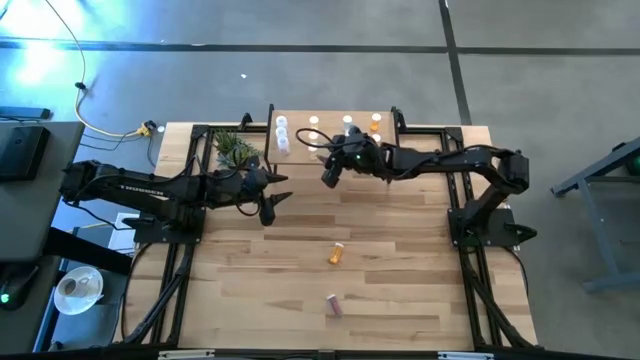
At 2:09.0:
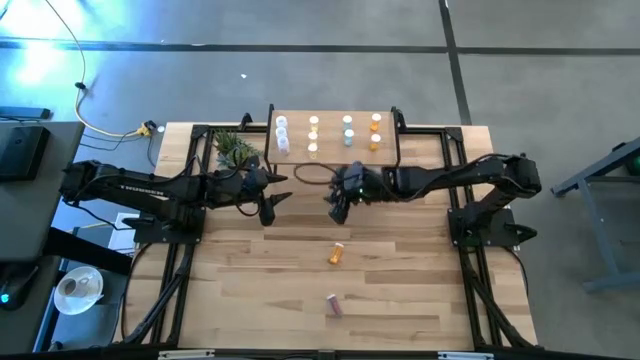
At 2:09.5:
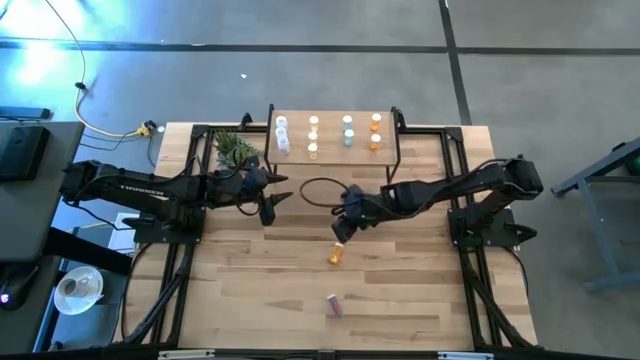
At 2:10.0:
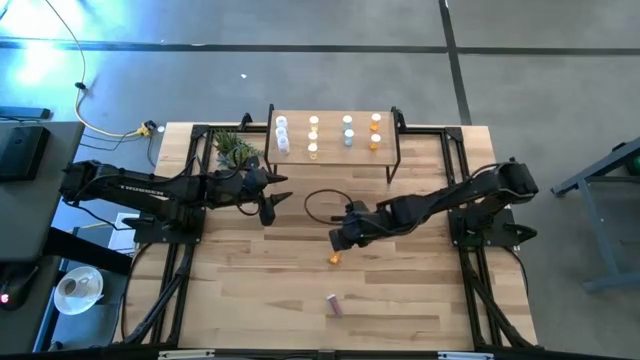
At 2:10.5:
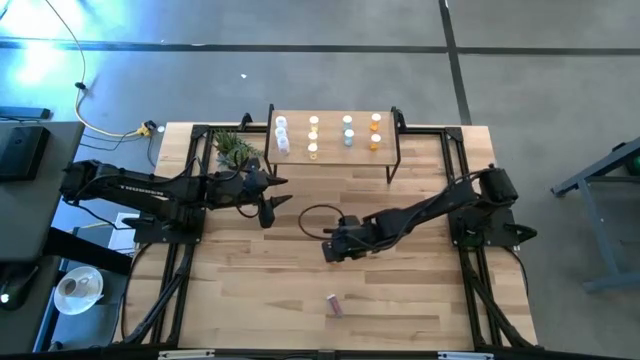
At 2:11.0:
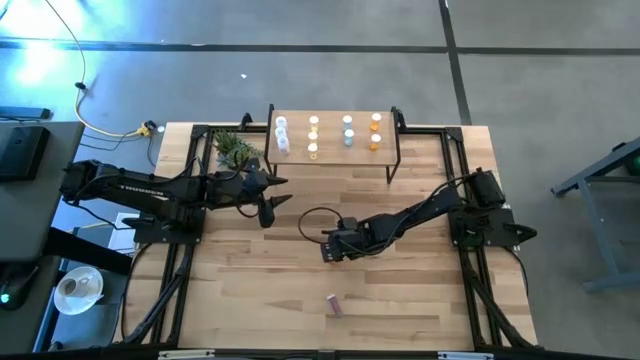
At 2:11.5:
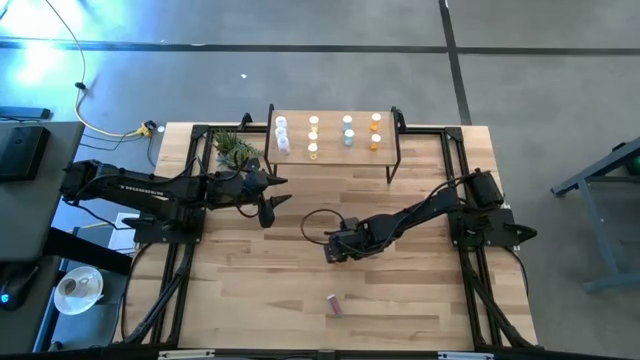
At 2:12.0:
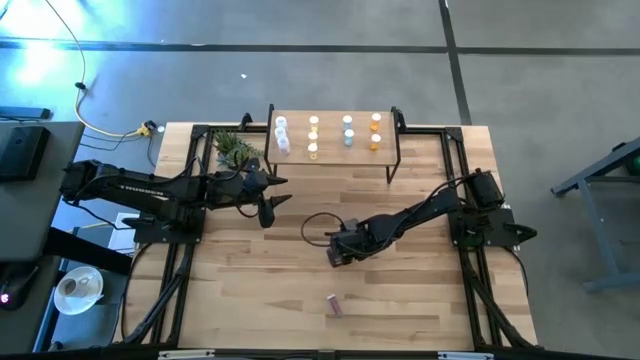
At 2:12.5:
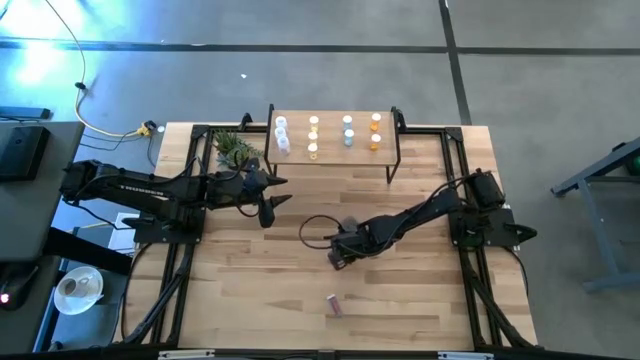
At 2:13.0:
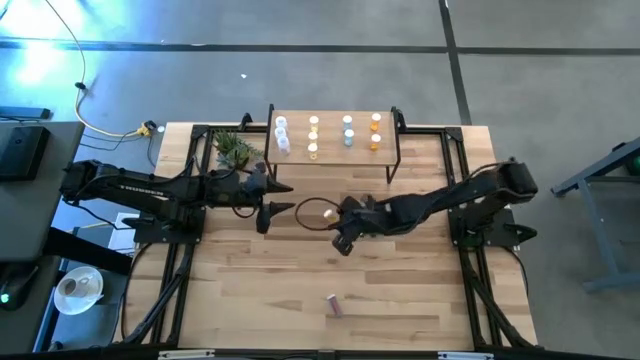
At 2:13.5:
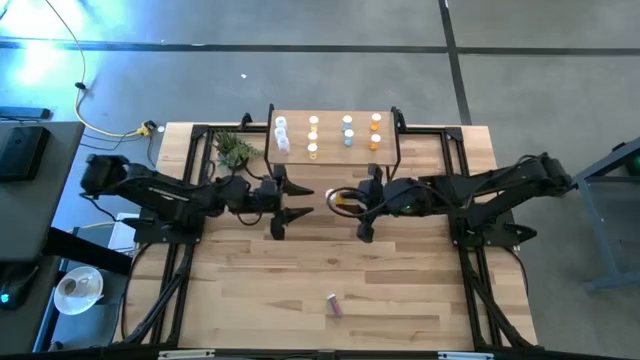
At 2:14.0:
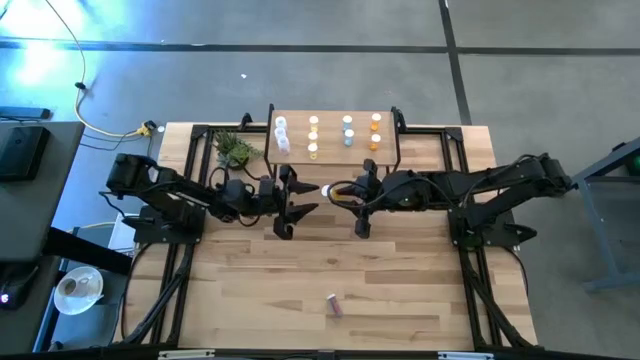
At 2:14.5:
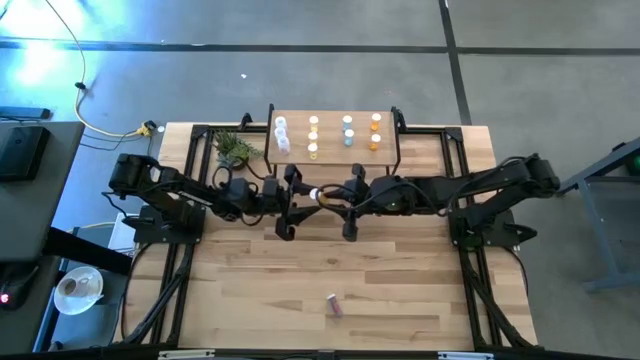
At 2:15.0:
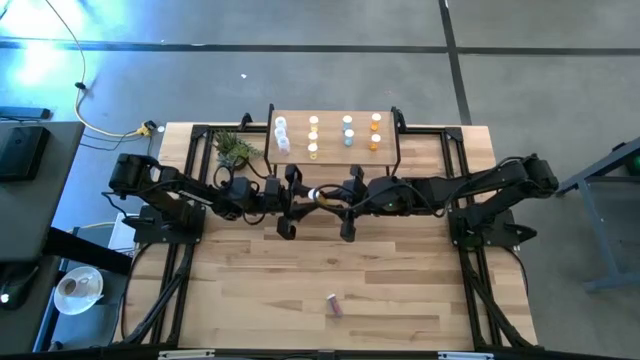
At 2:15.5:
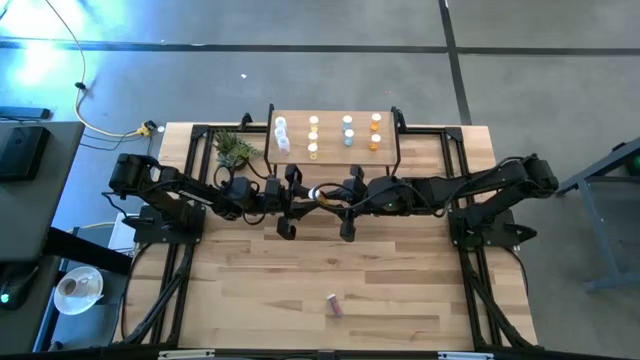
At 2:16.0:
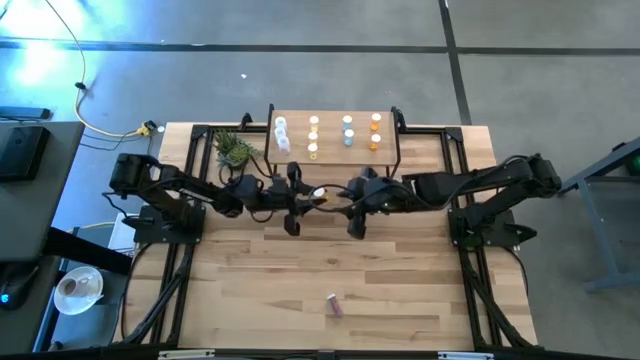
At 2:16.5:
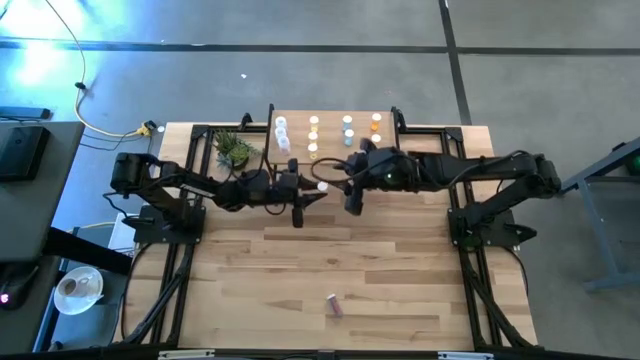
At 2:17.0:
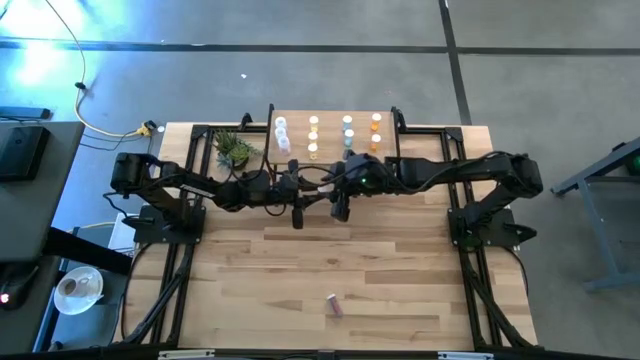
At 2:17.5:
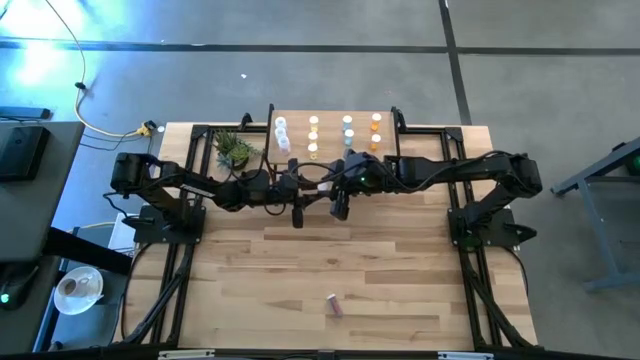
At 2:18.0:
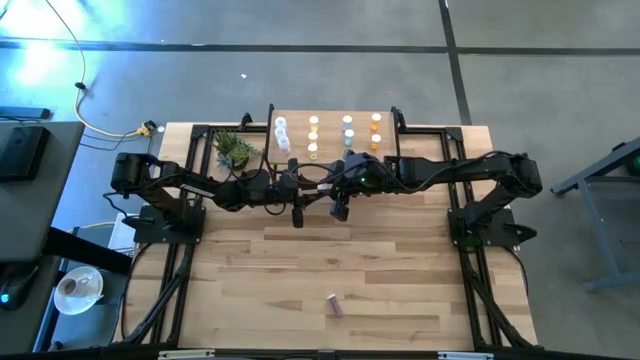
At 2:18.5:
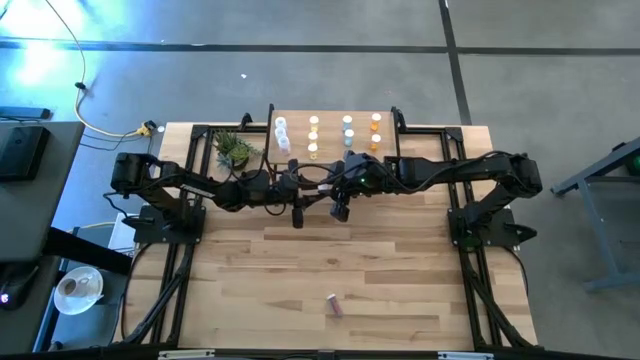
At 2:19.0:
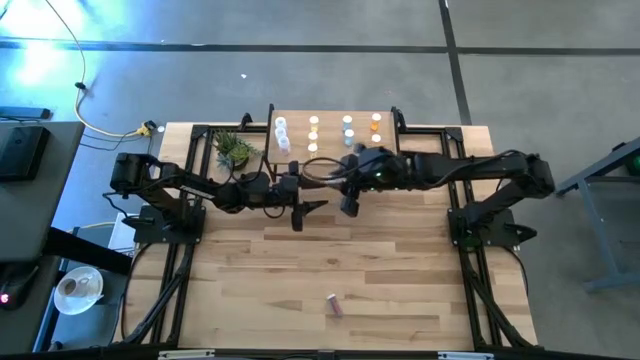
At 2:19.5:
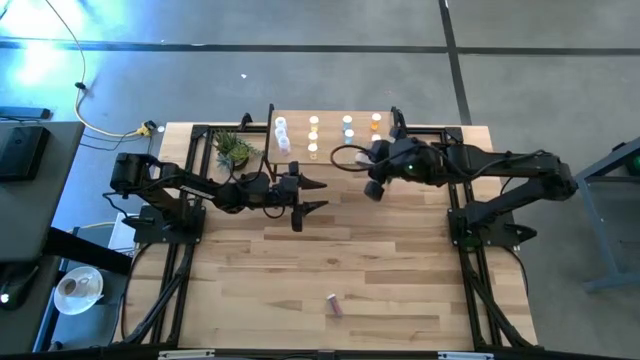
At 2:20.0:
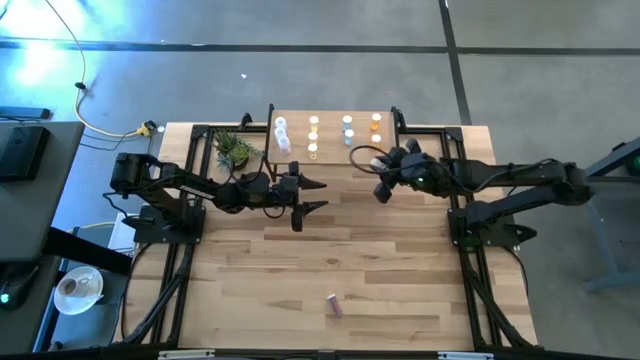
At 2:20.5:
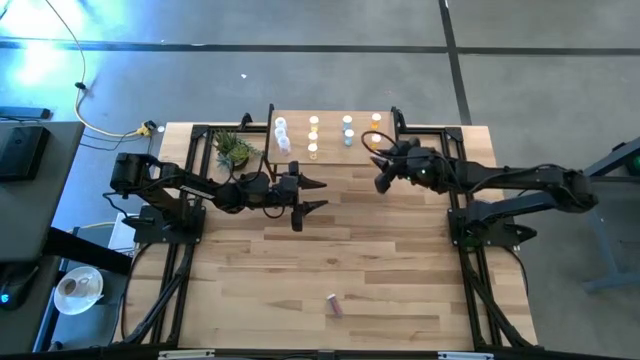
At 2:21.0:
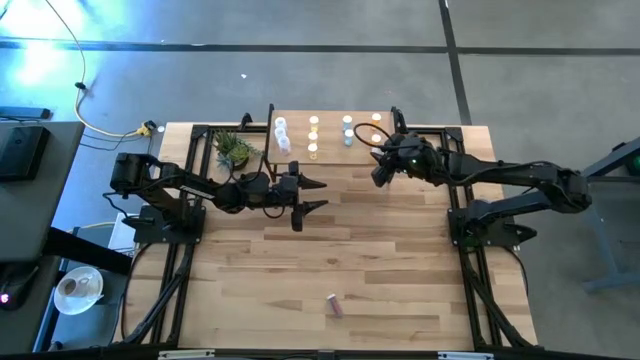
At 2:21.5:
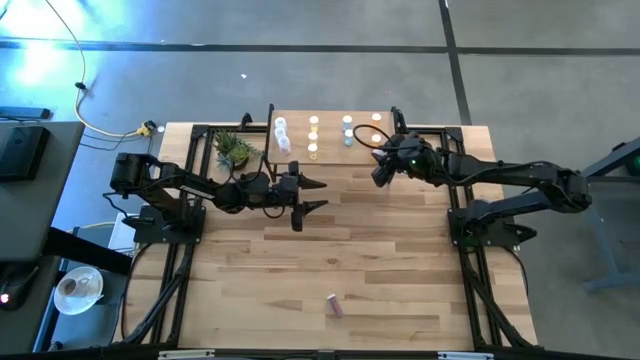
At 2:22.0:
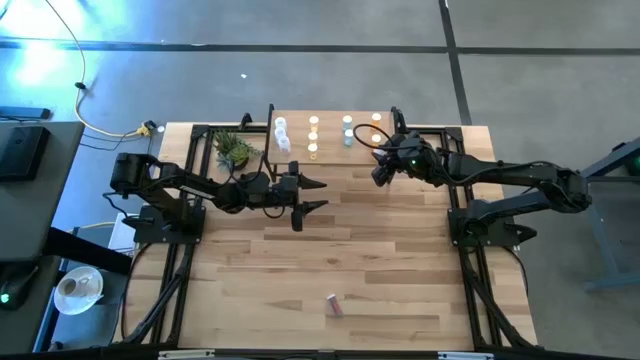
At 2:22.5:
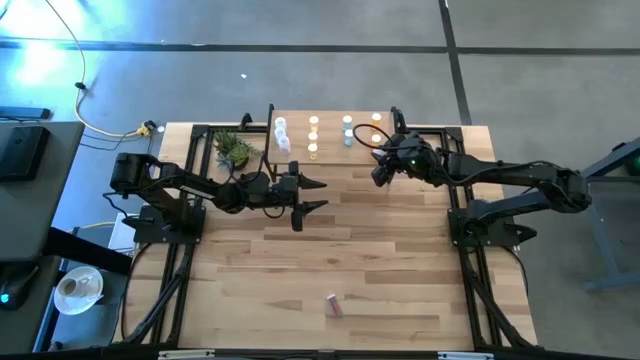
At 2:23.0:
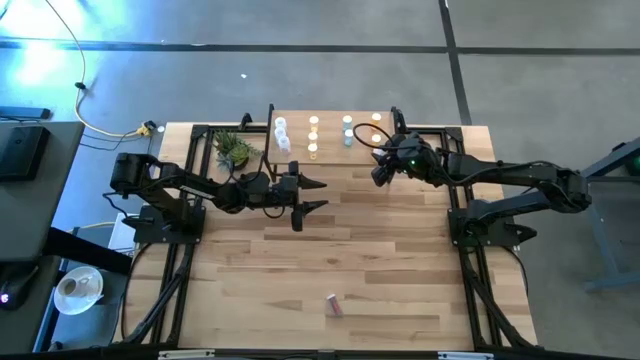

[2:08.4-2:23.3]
Task: Pick and place medicine bottles onto shelf by color
Put the orange pill bottle aligned with the other orange pill bottles on the shelf

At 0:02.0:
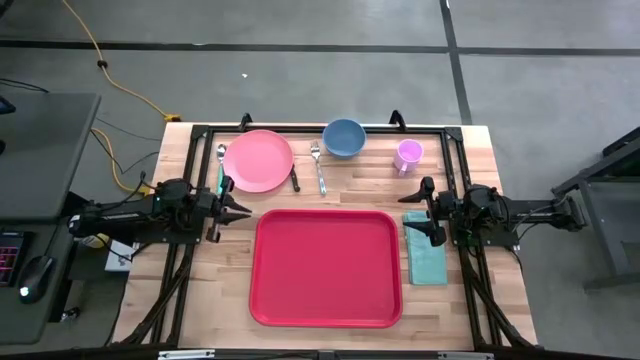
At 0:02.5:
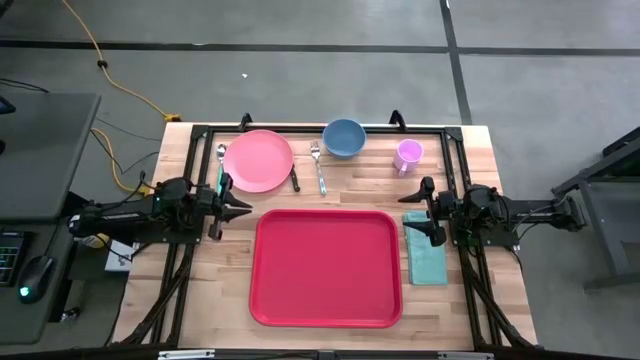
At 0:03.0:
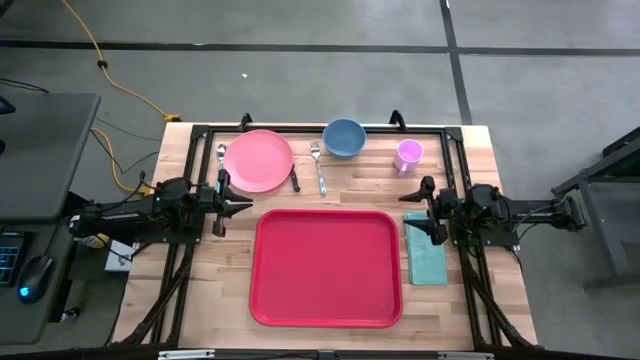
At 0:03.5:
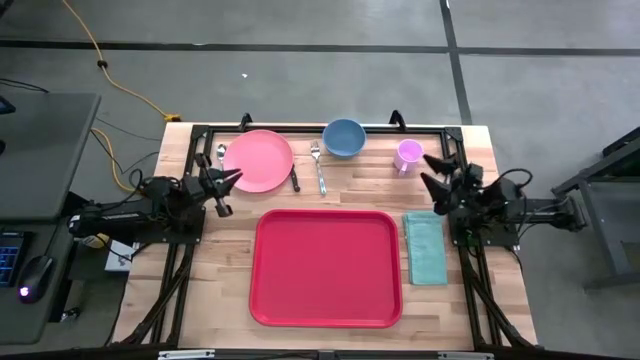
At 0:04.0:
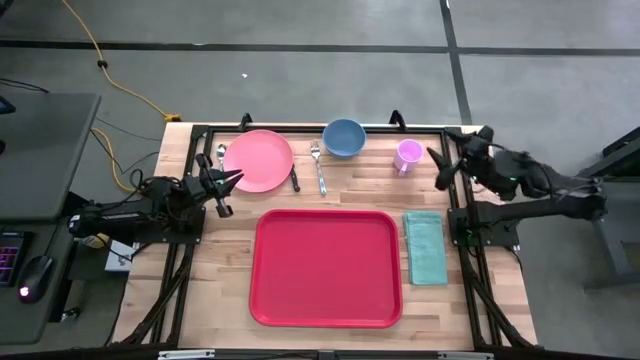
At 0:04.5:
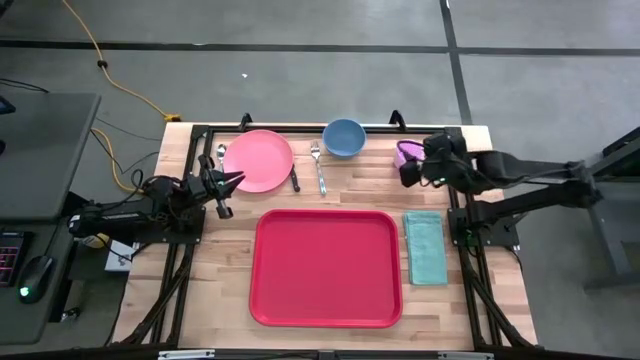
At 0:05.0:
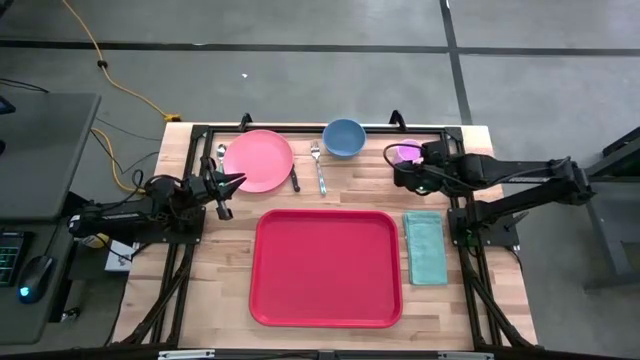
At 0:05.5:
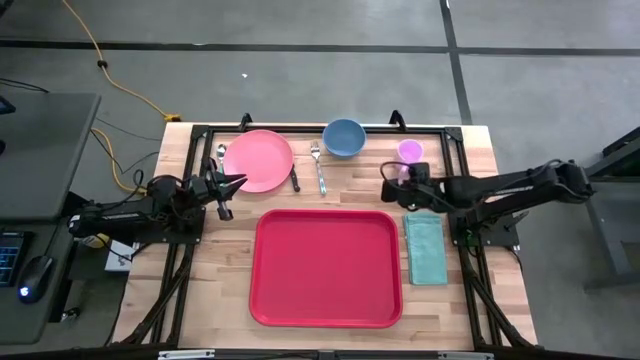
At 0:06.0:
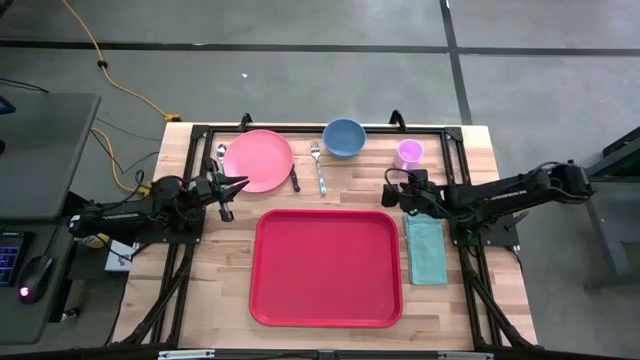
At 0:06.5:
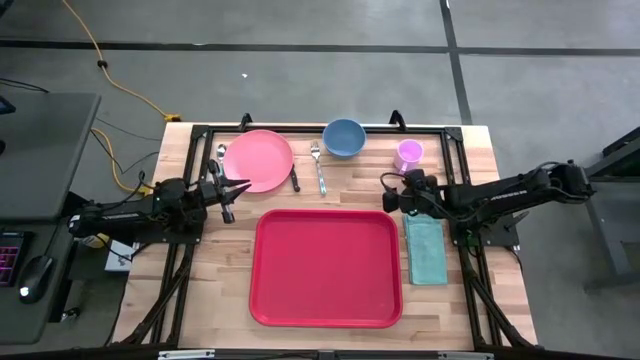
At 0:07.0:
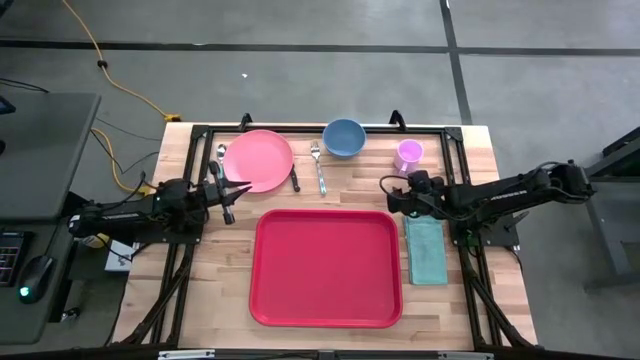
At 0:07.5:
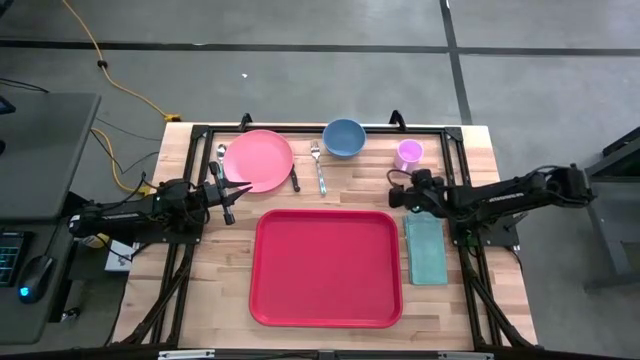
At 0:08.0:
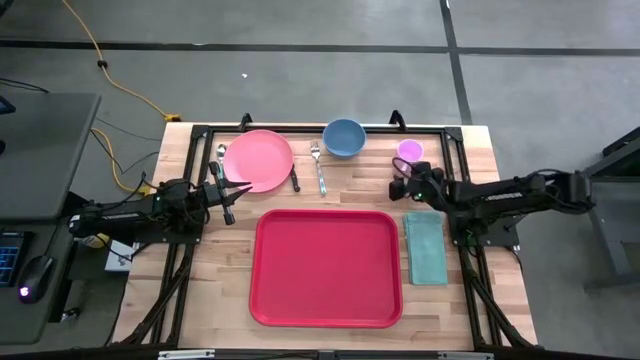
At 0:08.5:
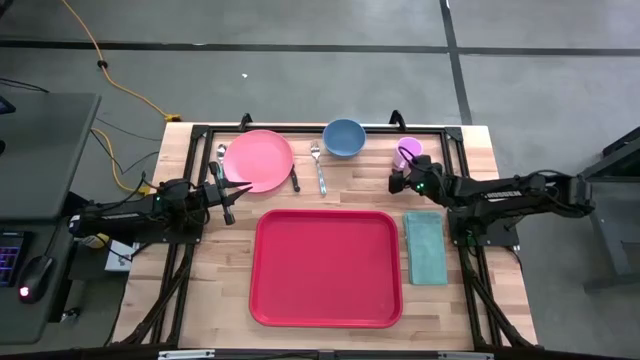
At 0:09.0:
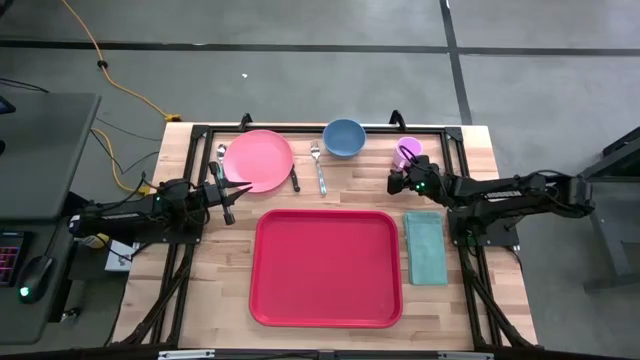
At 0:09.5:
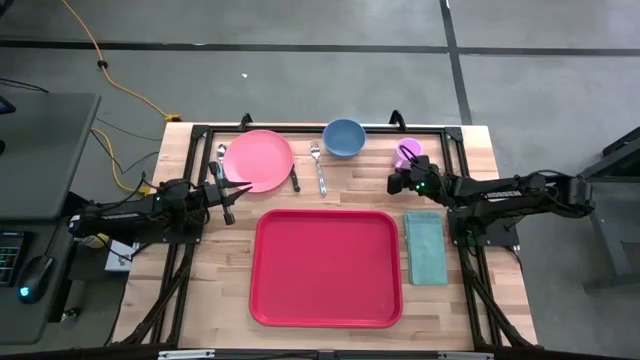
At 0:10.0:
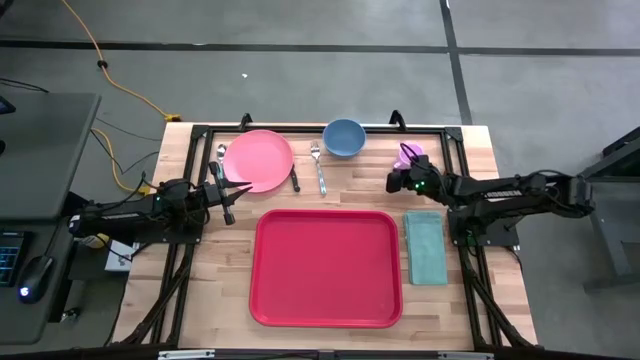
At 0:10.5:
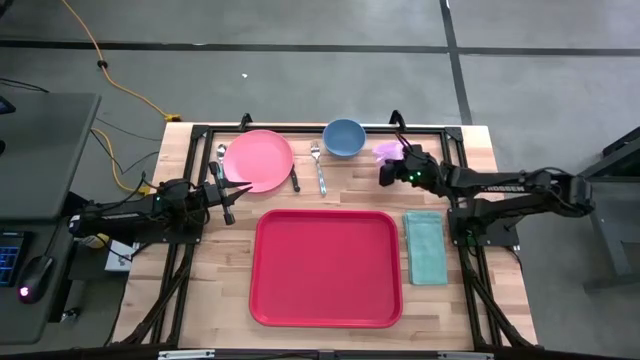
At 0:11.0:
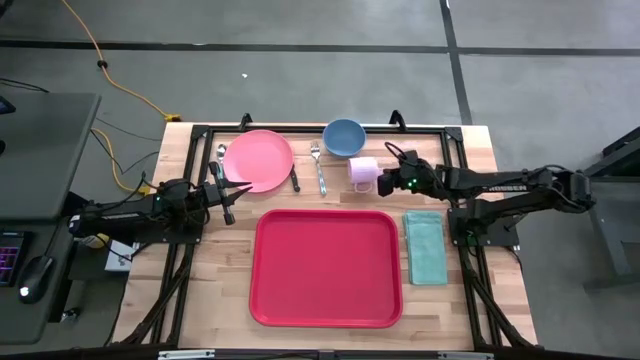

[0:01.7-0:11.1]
Task: Set up tray
Put the purple mug on the red tray
